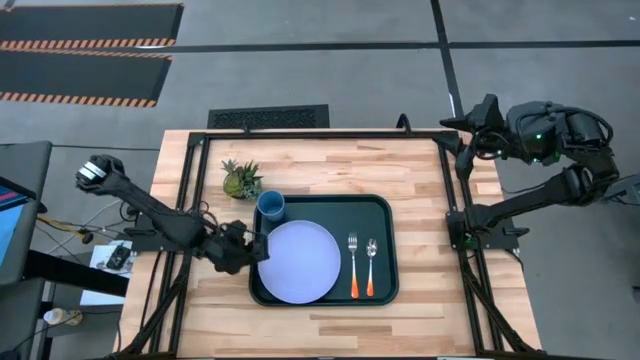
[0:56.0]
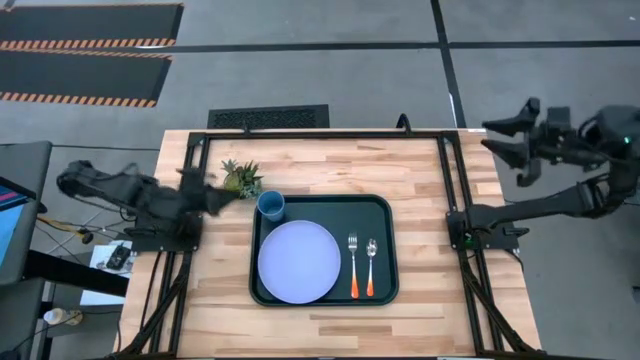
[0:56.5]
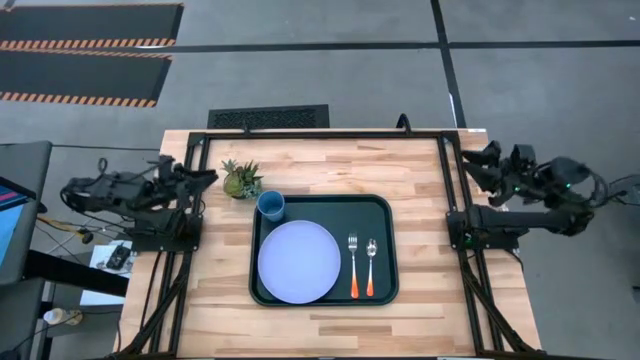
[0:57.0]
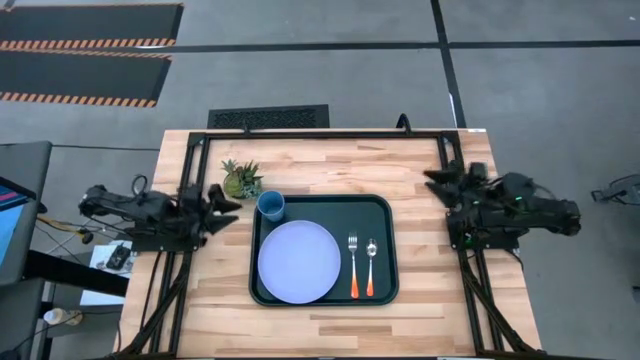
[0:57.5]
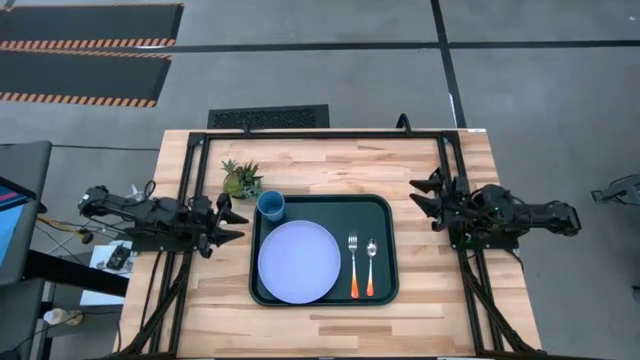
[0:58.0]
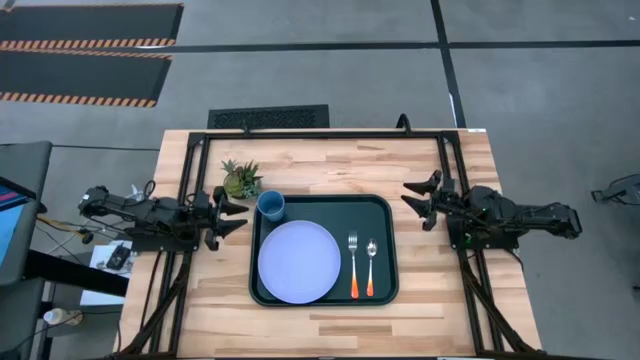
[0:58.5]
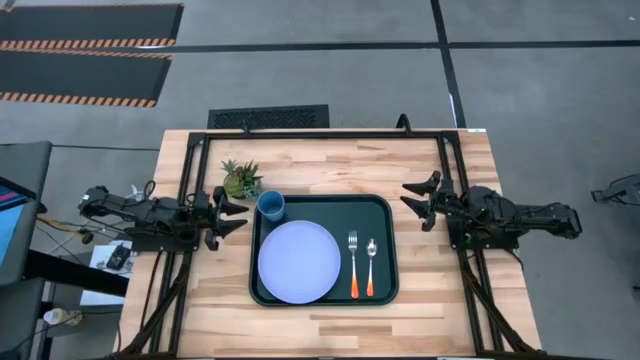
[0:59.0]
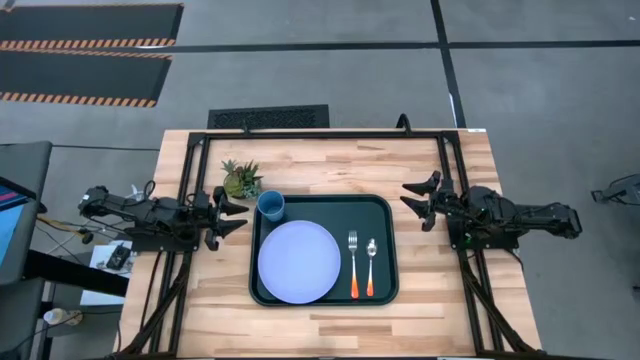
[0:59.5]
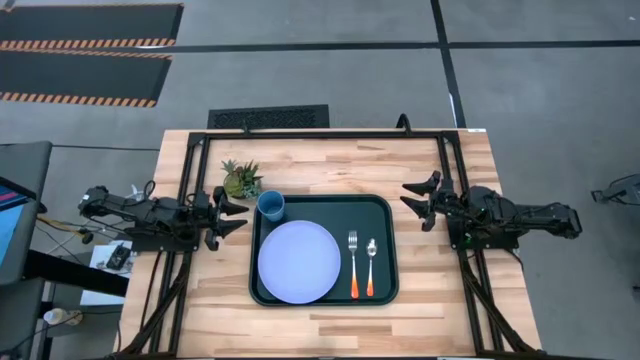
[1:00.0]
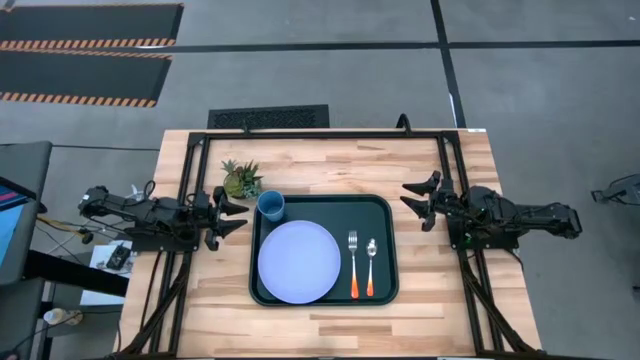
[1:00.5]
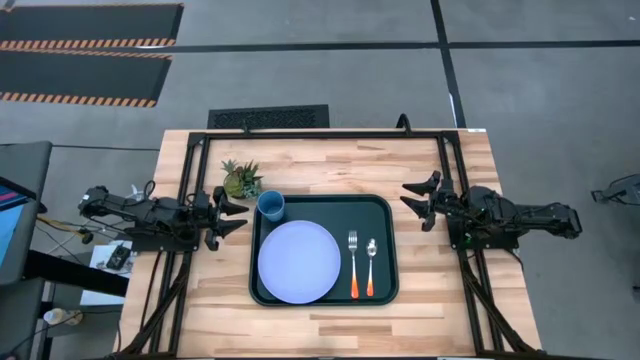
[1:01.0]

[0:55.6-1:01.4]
Task: Pick and place plate/cup/fork/spoon on tray
Return to Home Position

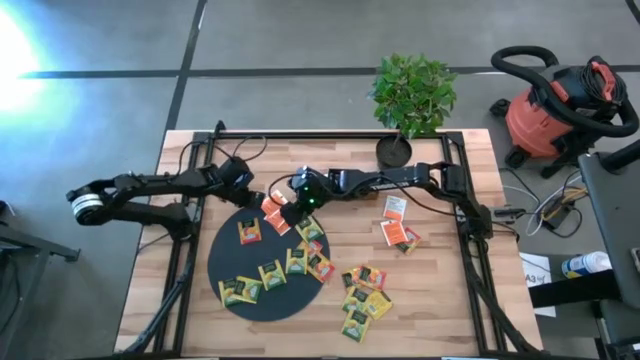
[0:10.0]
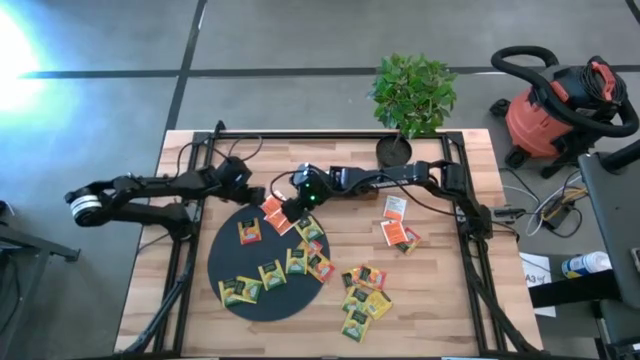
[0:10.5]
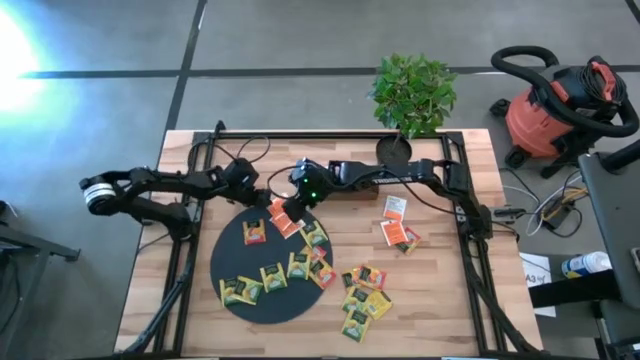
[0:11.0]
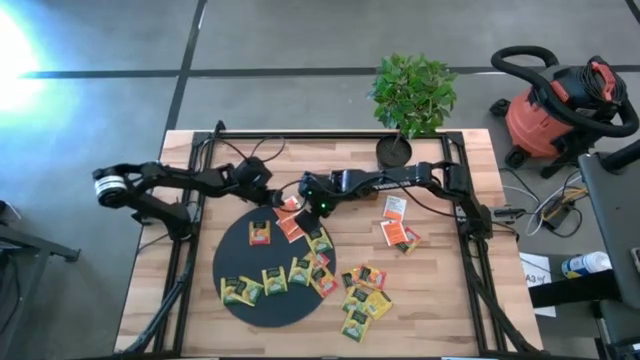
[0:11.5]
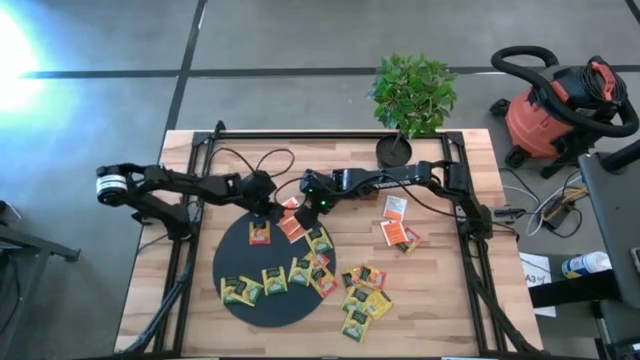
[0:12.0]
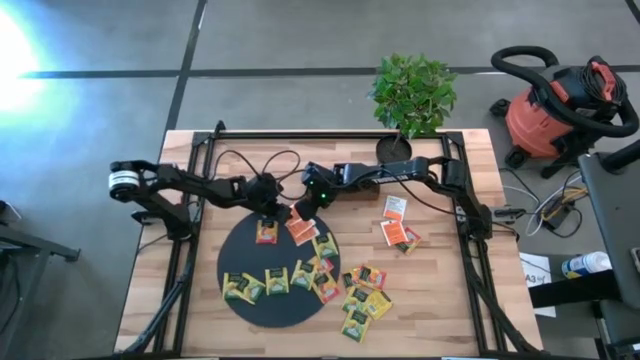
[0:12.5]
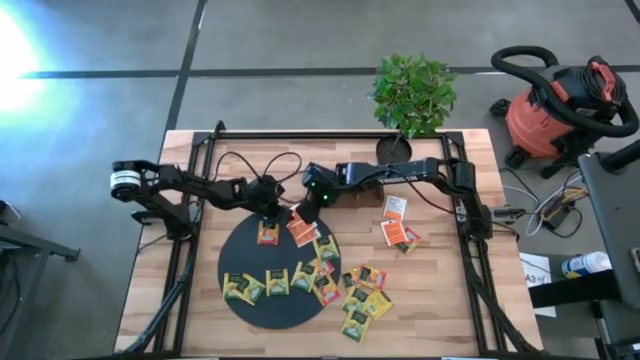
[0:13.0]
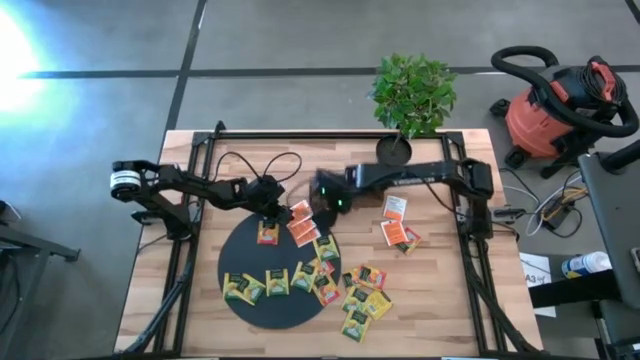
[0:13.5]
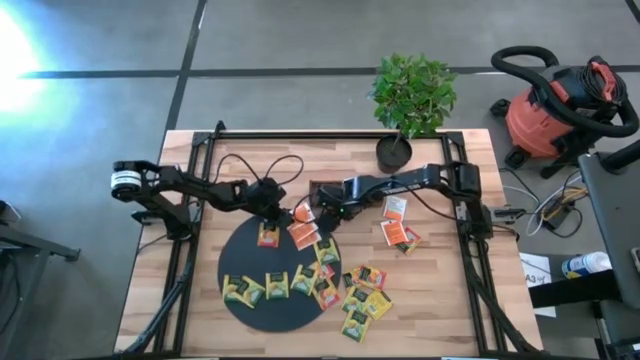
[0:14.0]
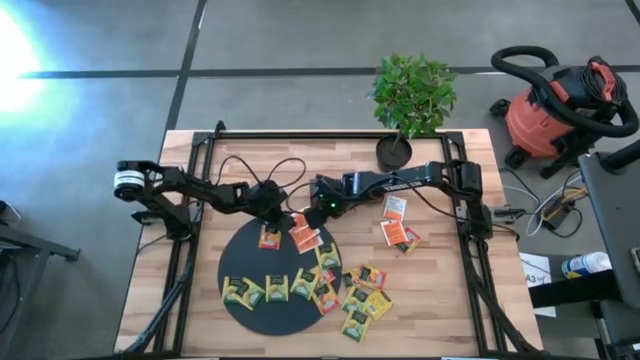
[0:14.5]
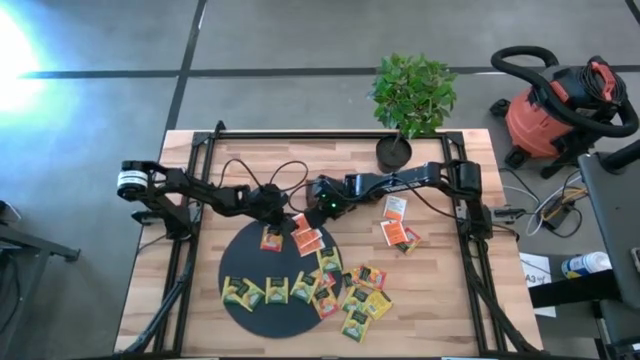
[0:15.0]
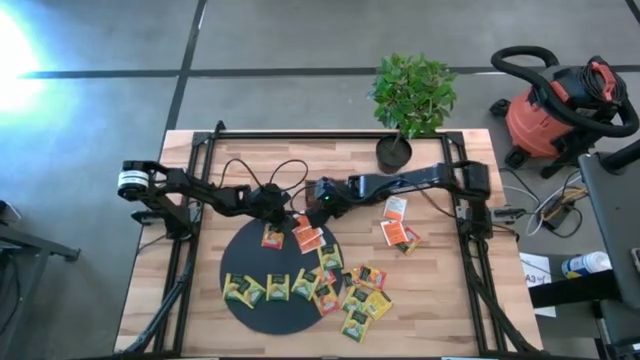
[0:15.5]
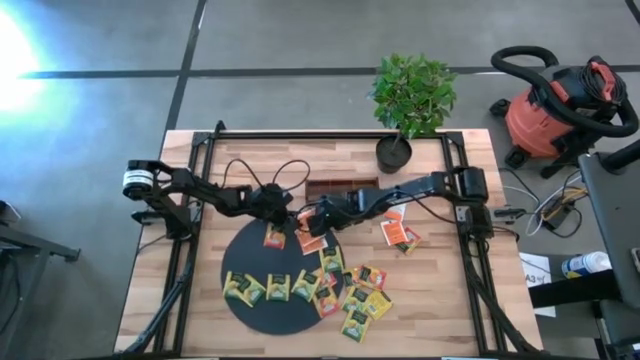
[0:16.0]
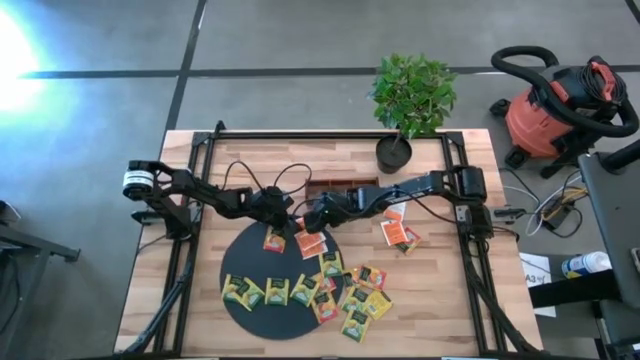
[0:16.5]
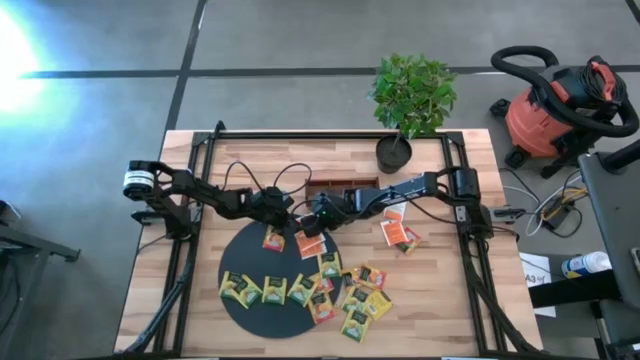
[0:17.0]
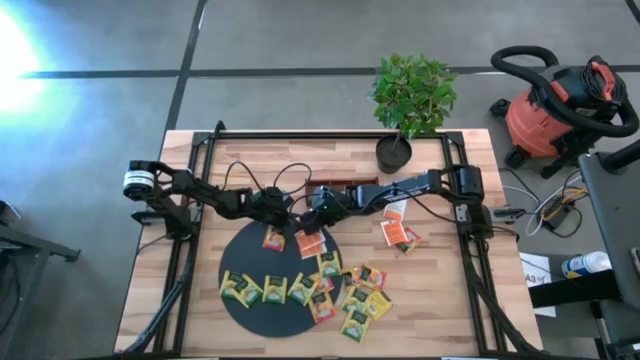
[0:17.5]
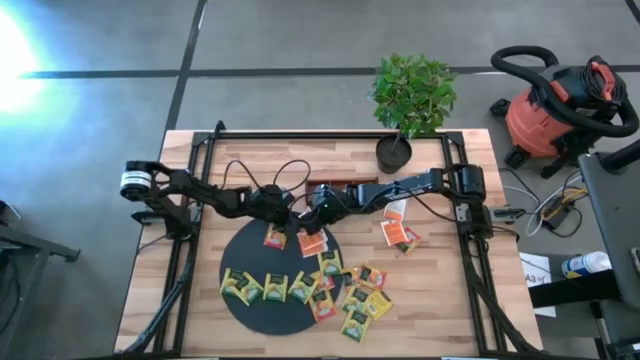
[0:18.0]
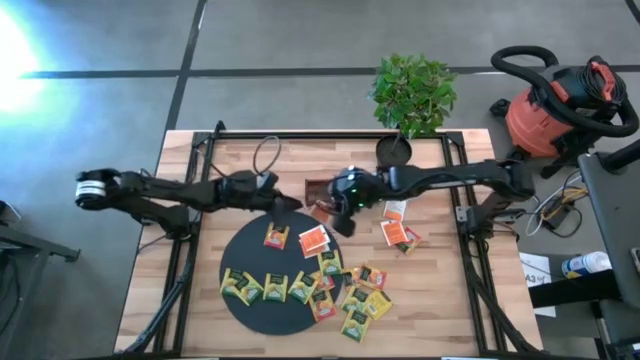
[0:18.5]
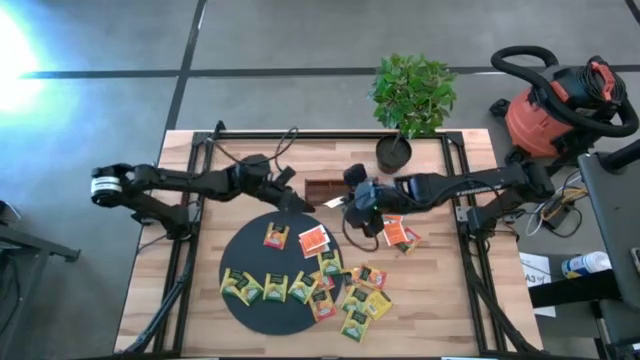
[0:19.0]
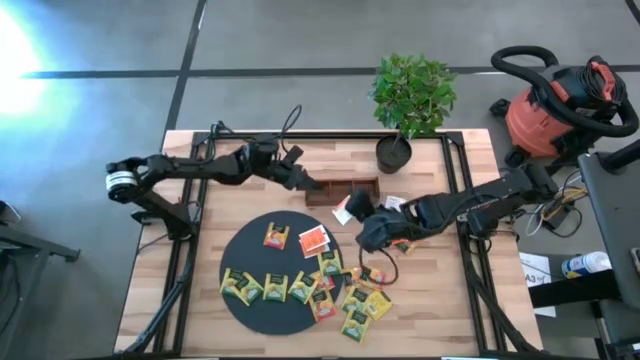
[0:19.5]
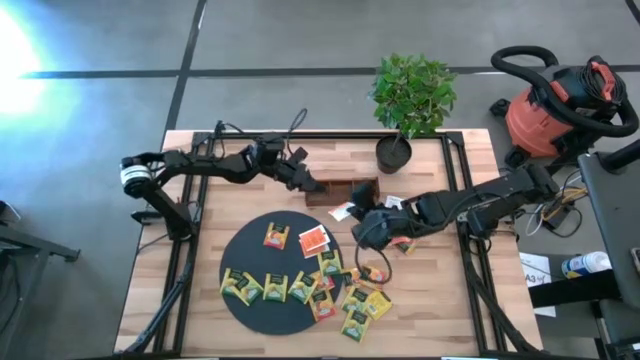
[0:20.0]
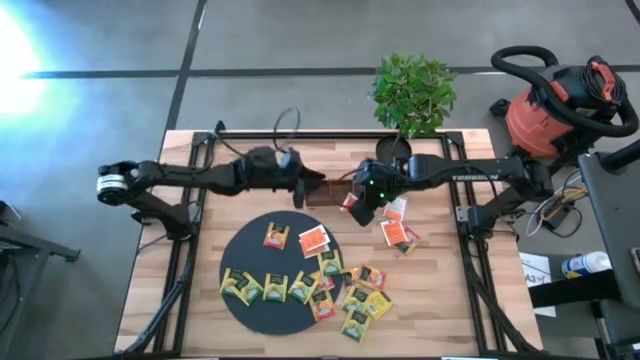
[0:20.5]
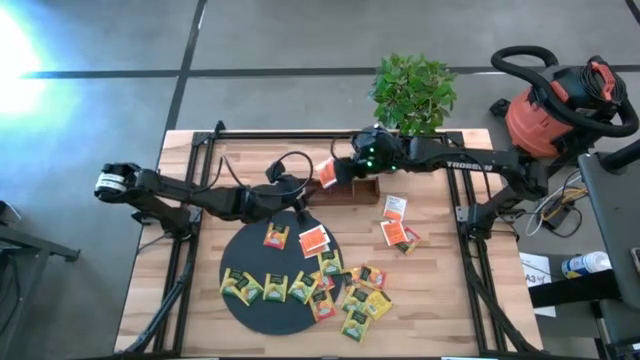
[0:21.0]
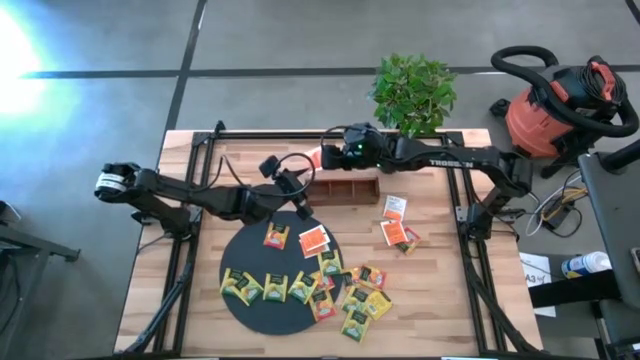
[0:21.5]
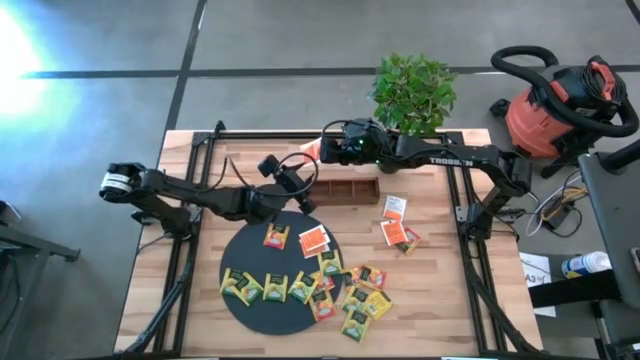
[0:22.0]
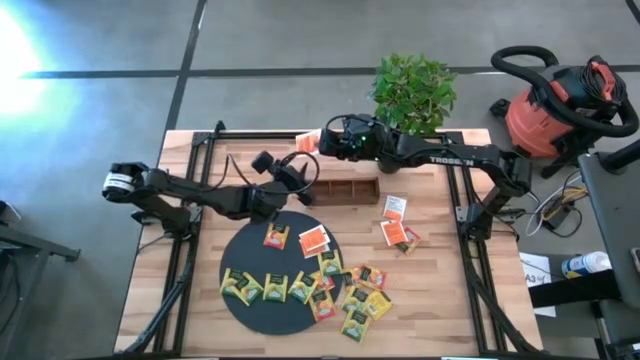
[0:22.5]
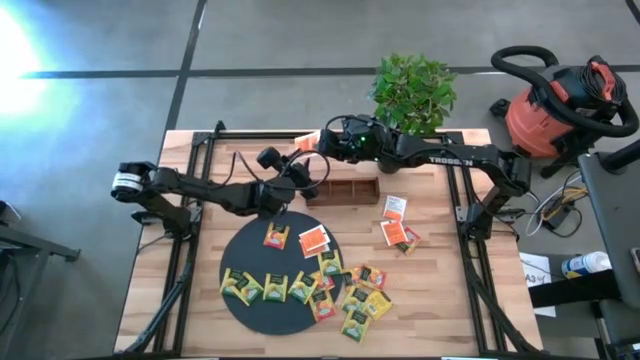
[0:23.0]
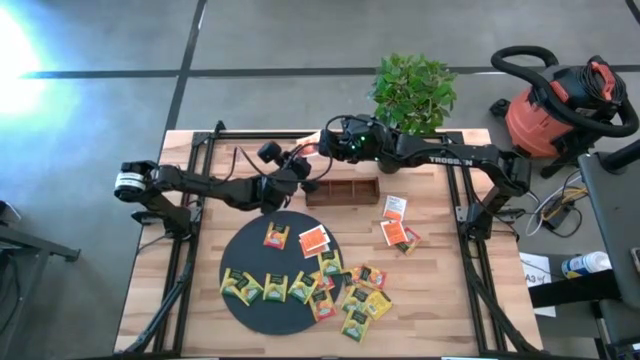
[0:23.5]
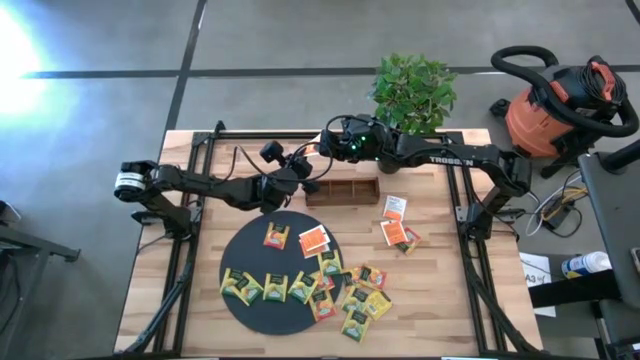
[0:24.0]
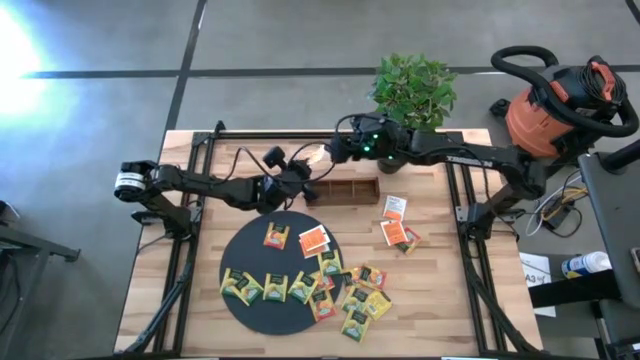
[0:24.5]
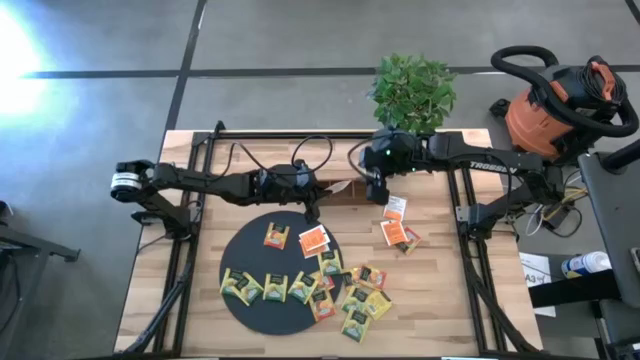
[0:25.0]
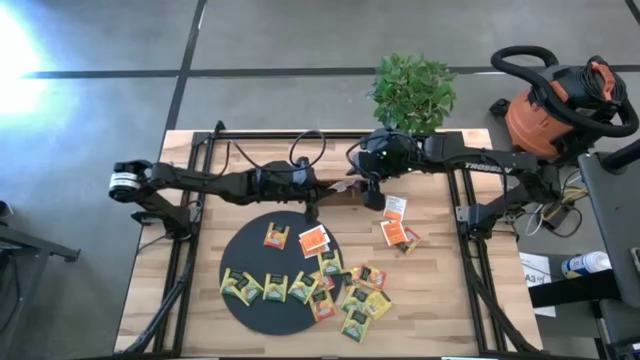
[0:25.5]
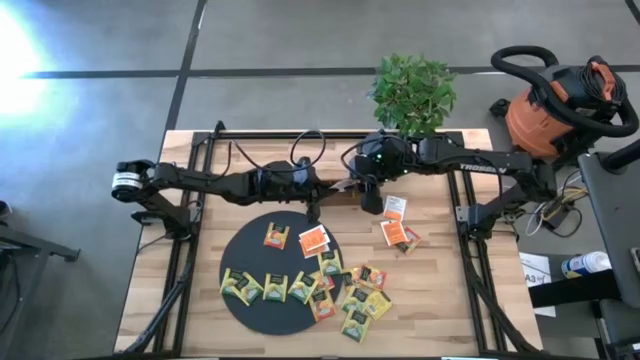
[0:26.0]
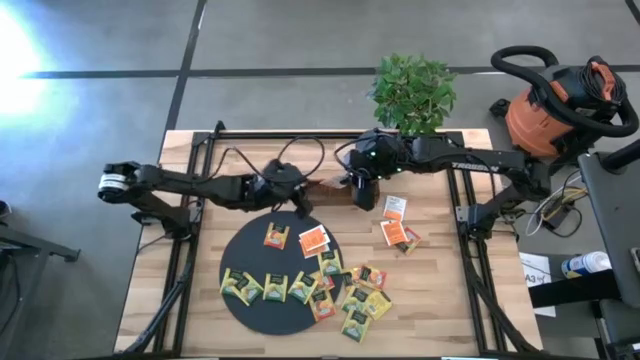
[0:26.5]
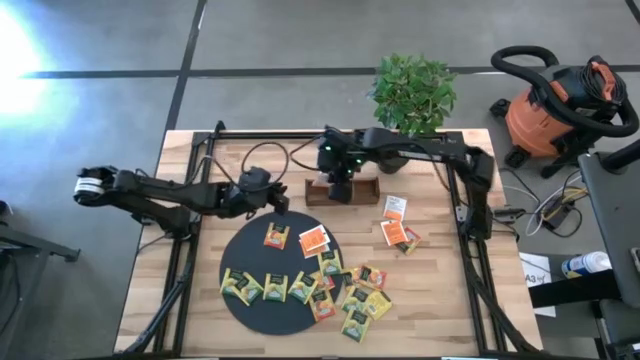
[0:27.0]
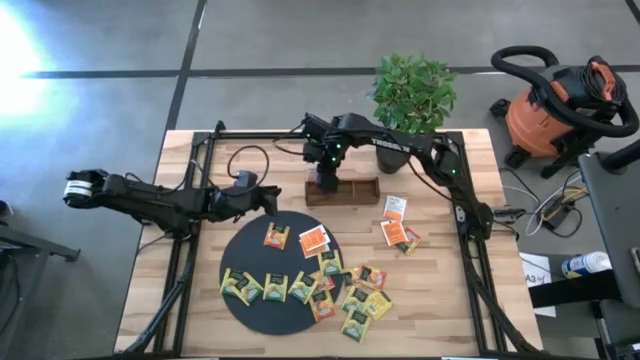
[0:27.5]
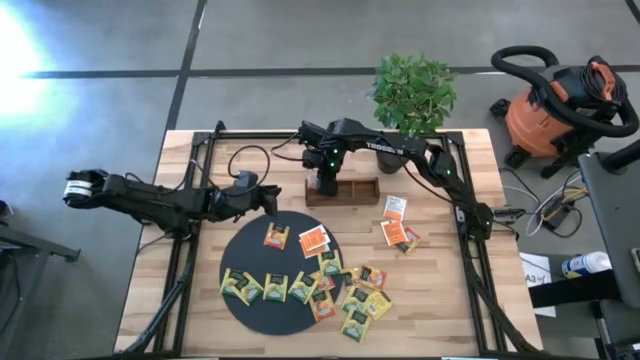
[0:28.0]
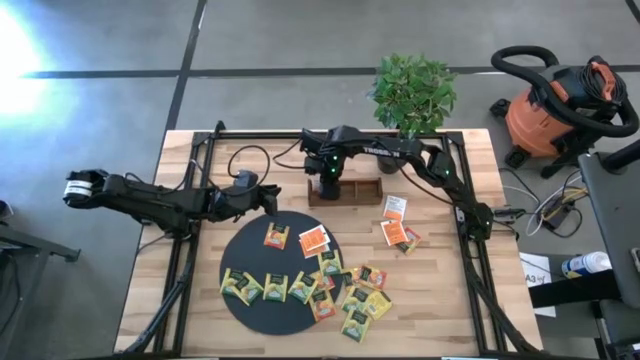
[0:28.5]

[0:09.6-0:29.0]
Task: Pick & Place Tea
Put the white tea bag into the left section of the brown wooden organizer
